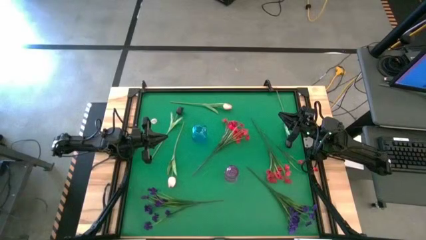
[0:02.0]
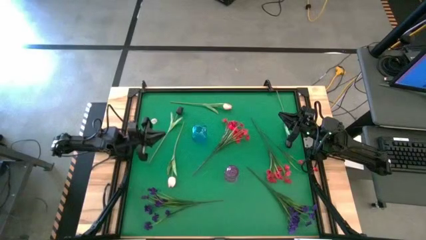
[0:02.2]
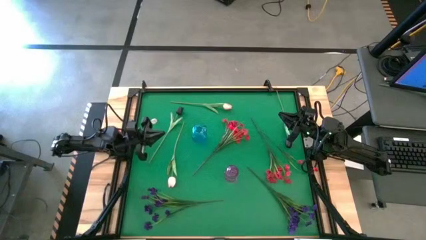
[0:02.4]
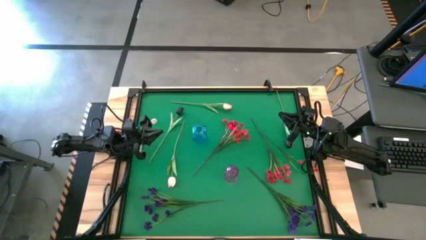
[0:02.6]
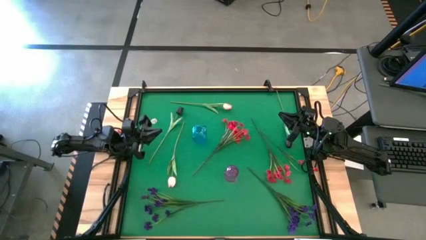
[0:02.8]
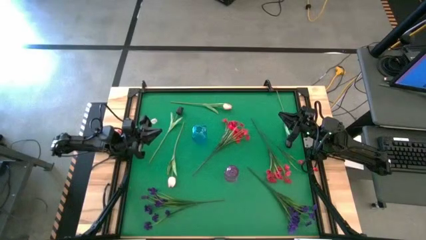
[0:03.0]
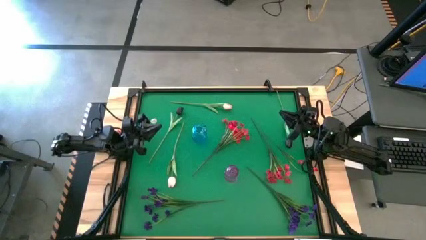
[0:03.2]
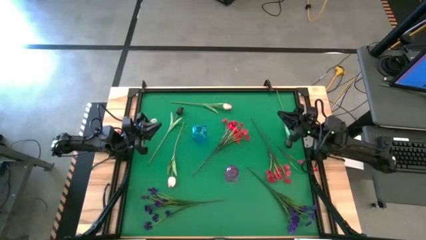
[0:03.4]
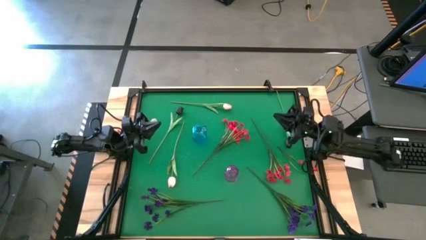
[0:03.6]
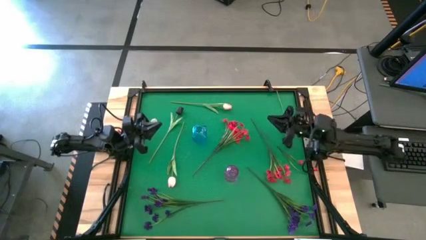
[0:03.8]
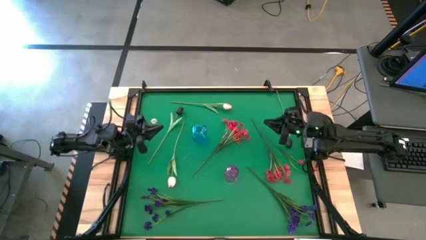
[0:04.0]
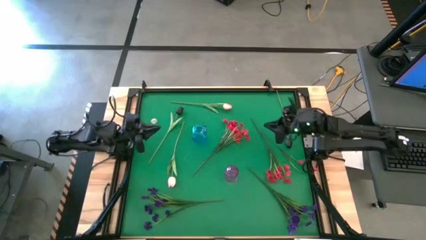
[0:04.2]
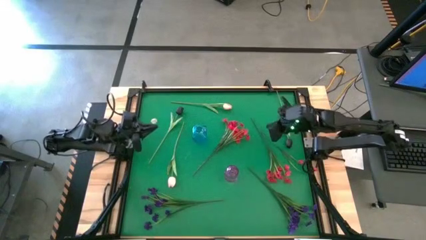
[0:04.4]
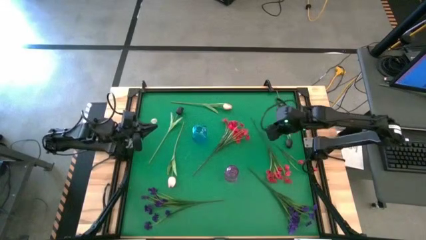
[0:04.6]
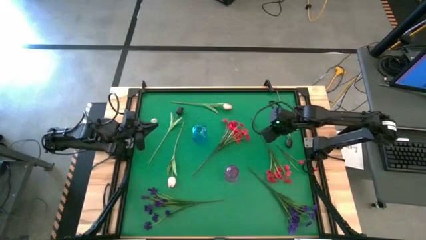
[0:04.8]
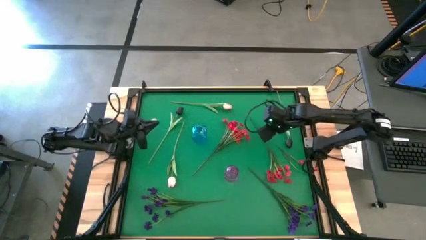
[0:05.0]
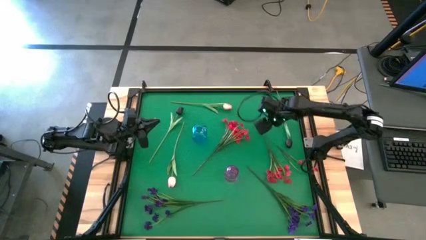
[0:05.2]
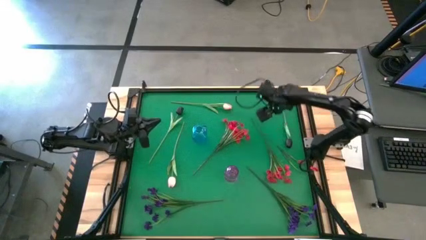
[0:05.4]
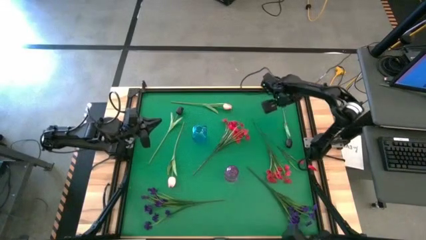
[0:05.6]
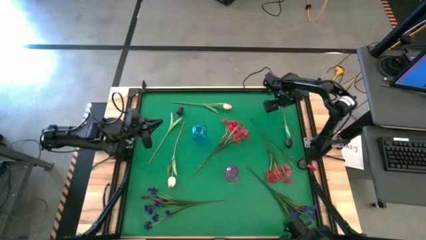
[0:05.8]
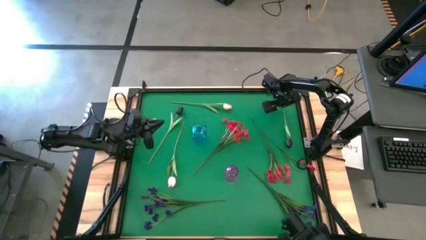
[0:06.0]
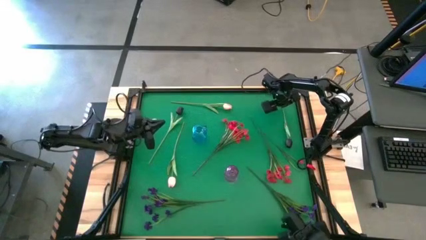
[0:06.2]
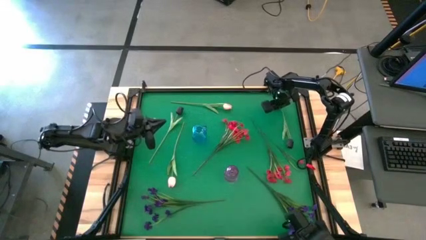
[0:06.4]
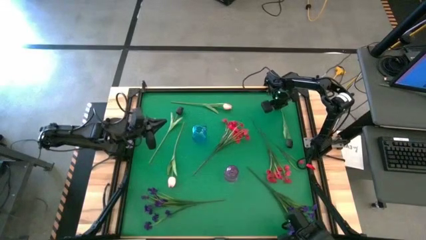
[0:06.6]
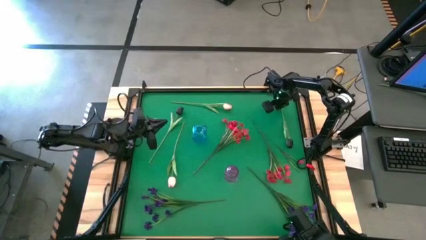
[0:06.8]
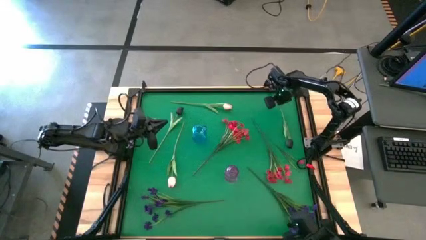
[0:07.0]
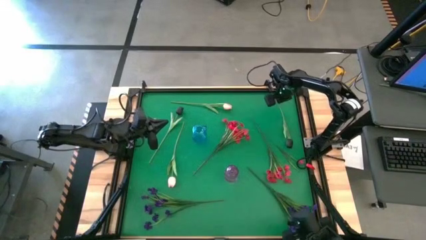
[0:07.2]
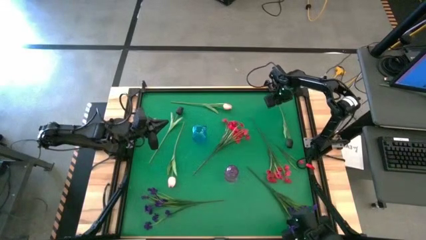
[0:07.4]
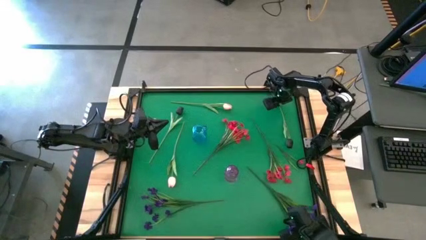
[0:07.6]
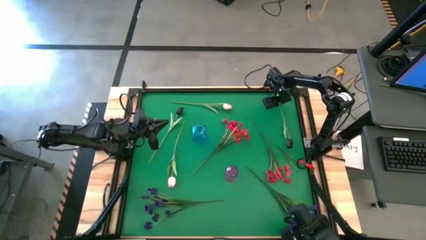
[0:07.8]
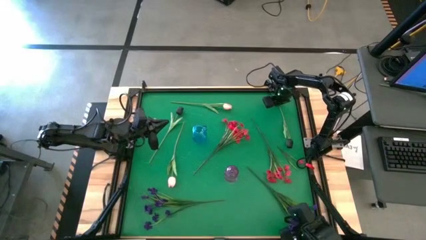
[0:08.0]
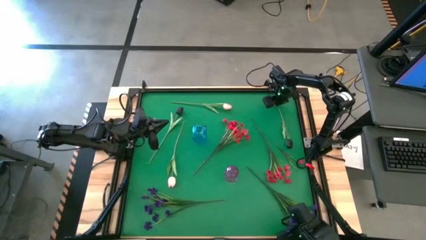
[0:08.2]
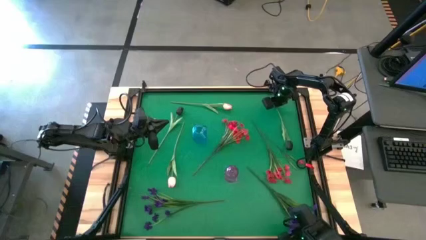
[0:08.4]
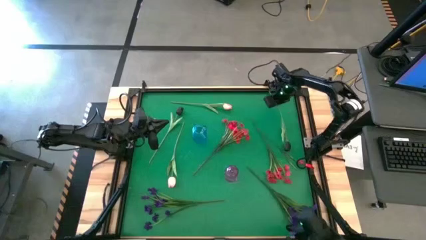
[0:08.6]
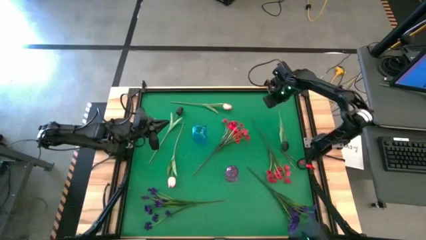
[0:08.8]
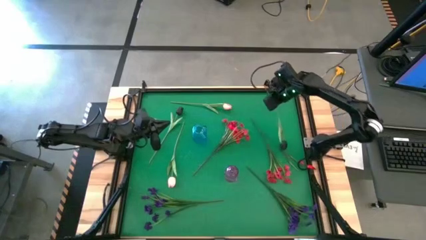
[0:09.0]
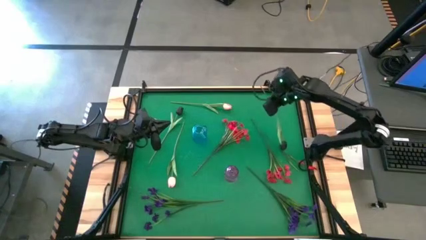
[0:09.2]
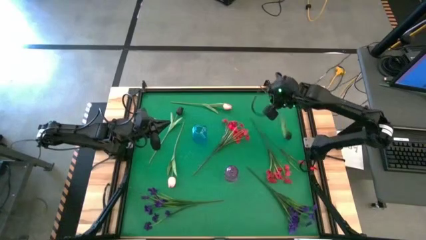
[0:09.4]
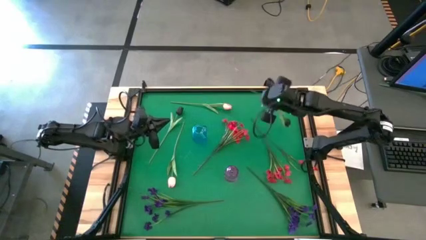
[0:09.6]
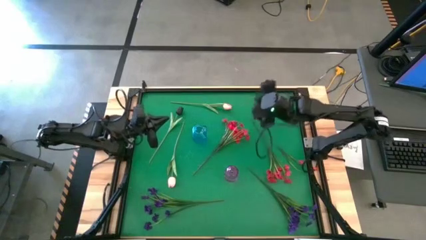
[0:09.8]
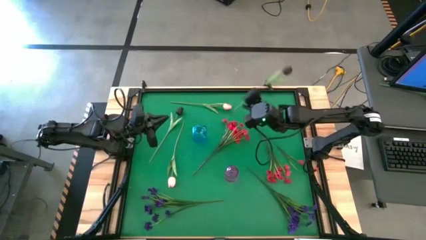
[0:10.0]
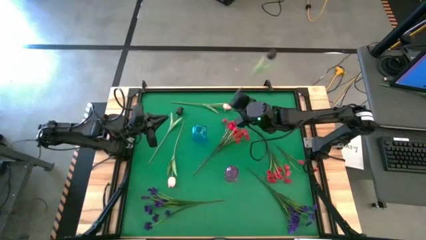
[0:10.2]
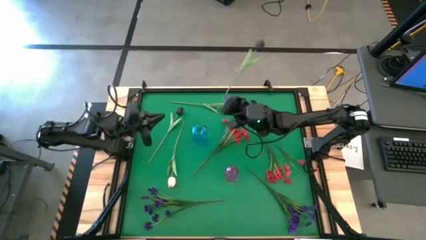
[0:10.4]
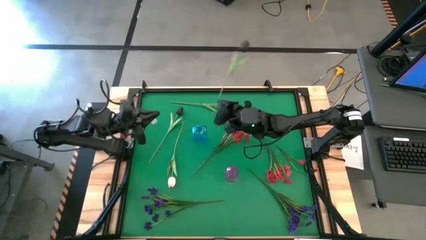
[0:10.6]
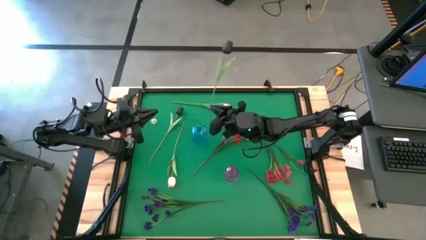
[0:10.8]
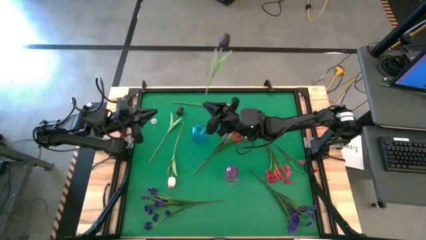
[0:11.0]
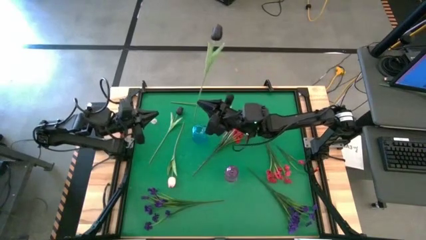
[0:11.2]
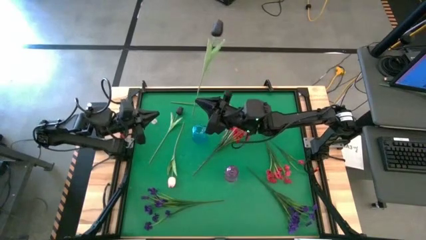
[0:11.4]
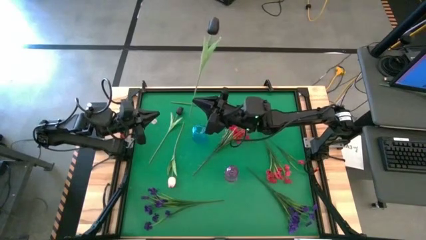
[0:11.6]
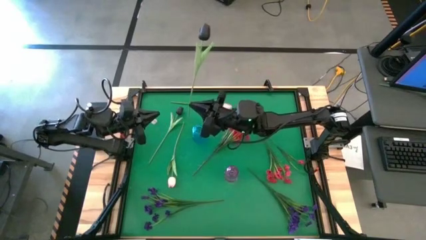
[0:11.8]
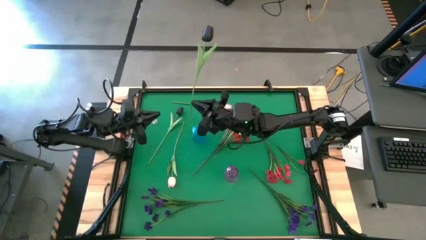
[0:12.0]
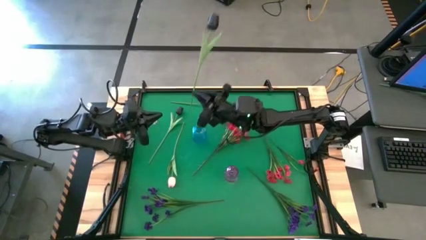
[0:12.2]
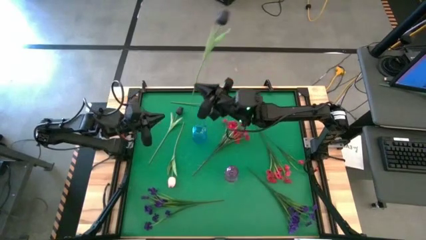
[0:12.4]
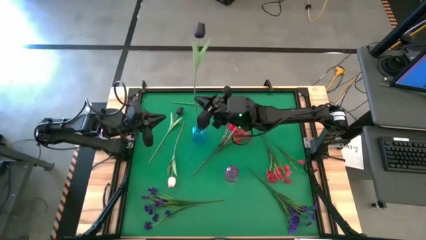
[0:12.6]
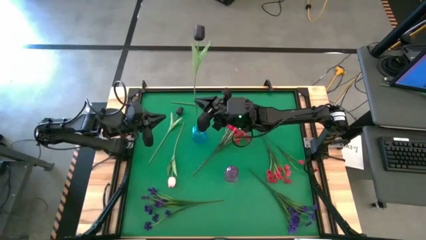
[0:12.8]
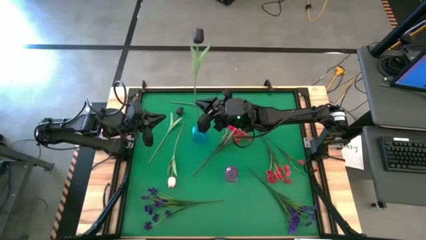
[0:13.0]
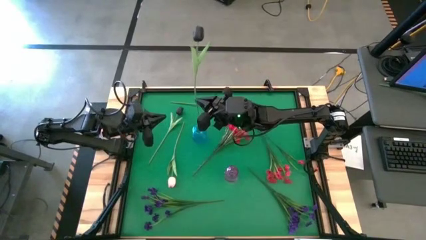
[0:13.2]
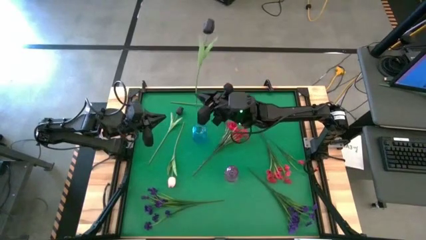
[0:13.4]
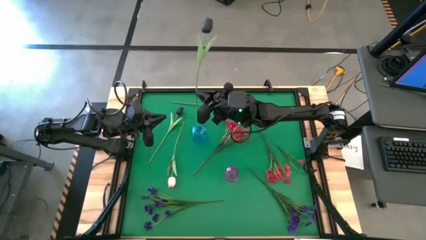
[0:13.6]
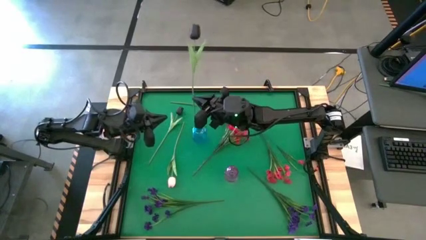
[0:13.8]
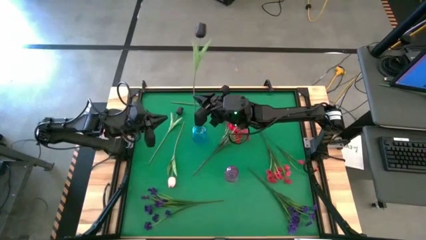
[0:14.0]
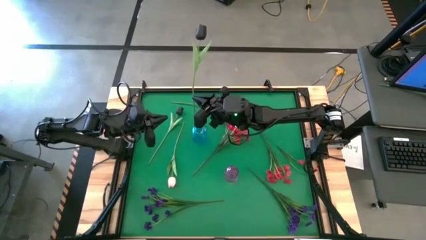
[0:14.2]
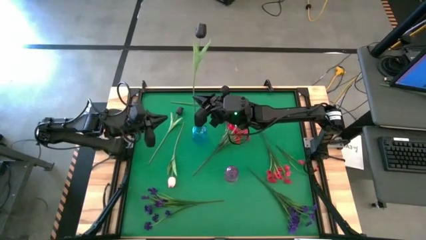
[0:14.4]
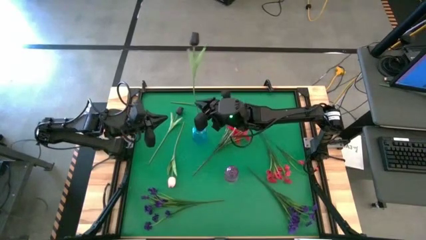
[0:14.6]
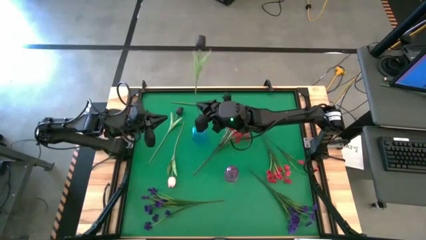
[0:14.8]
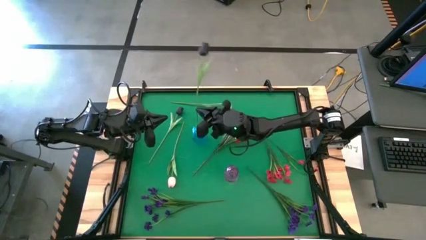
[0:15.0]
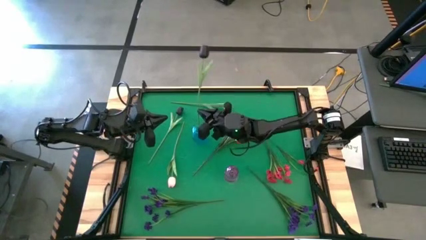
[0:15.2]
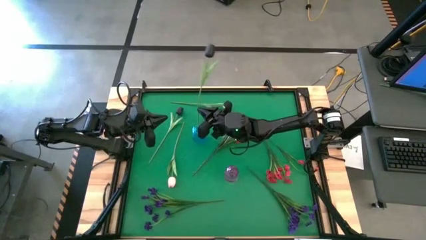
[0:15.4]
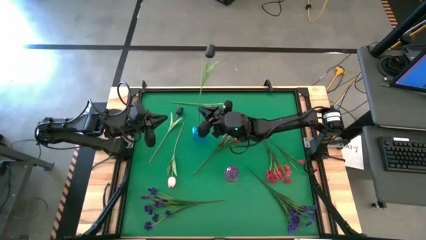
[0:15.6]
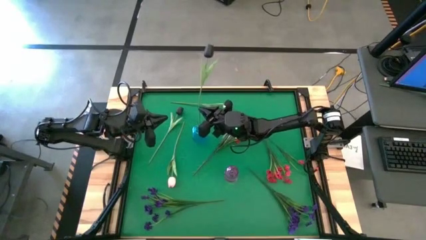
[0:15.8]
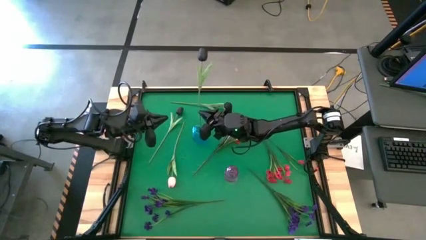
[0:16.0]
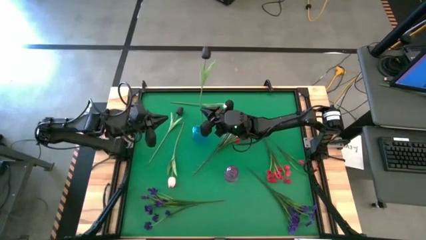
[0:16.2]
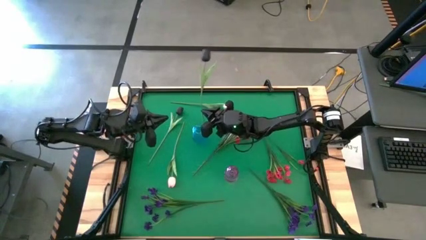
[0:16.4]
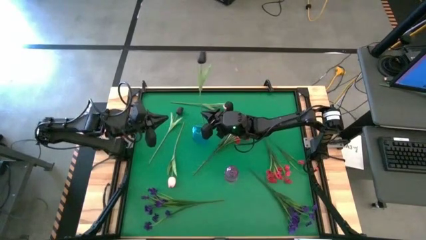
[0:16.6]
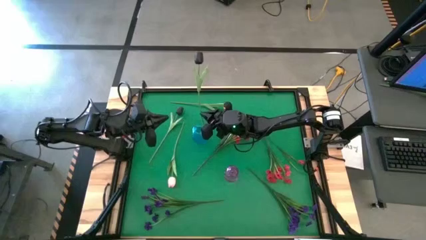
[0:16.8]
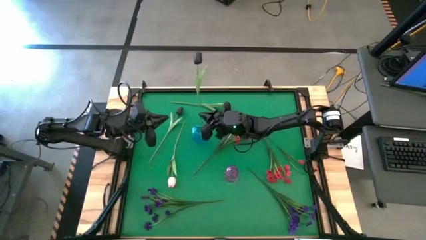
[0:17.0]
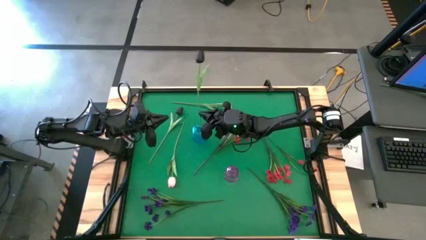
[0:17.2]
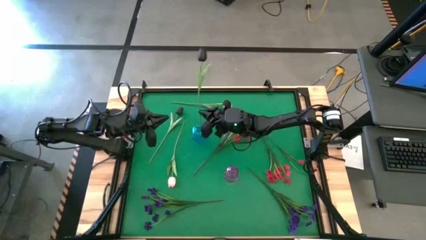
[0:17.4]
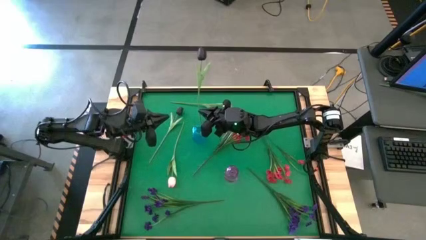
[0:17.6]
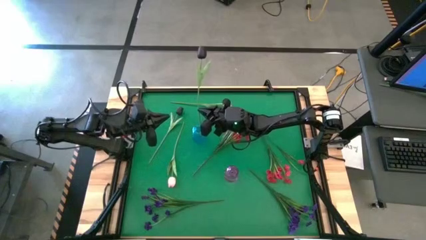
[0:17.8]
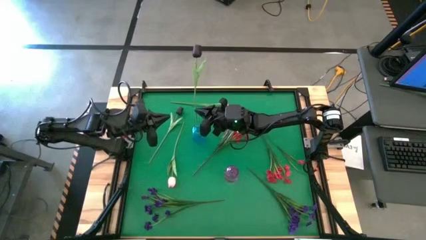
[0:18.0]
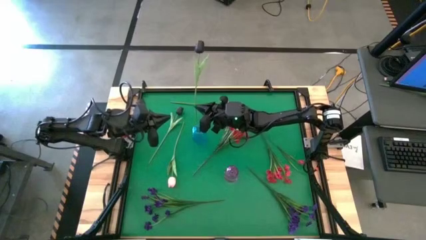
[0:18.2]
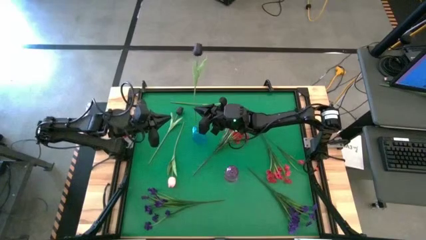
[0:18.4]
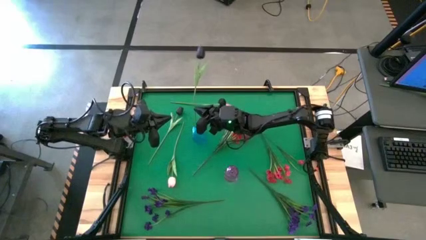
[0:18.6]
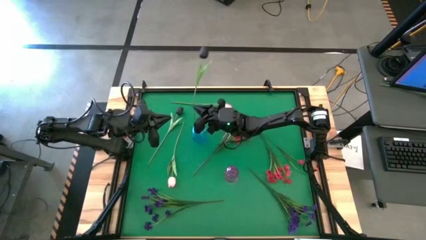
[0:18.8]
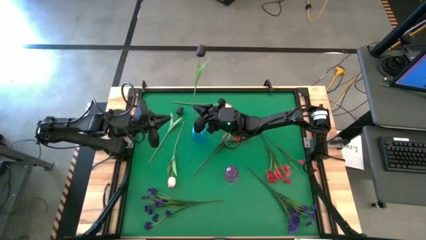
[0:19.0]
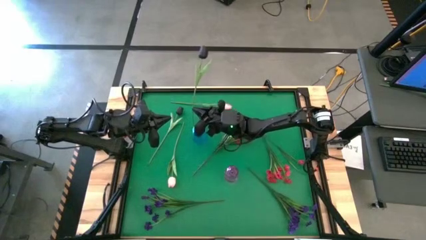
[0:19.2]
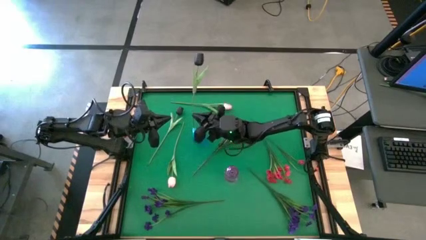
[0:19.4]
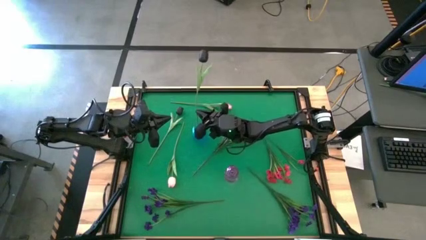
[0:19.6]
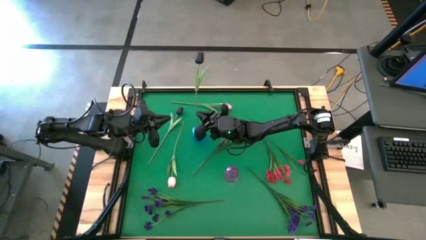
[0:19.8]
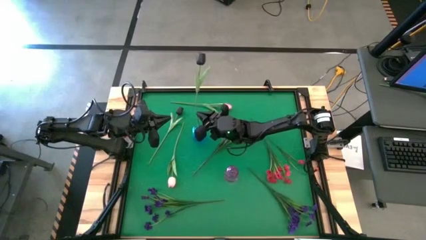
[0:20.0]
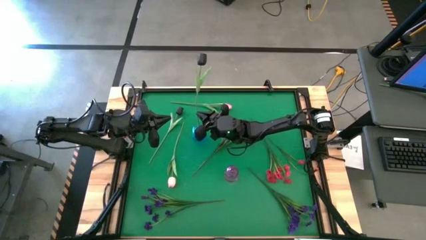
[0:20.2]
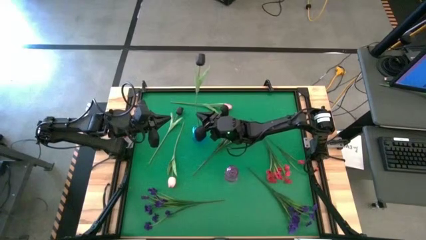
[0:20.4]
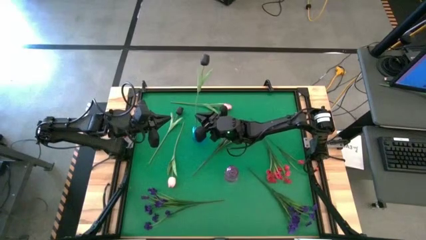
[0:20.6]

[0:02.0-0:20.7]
Task: Sort flowers into vase by color
Put the right black tulip into the blue vase
